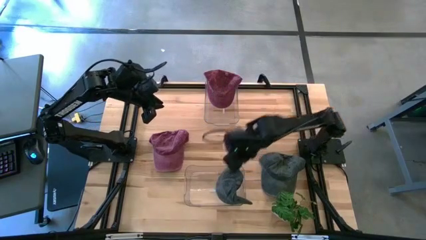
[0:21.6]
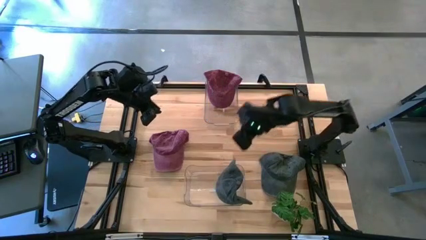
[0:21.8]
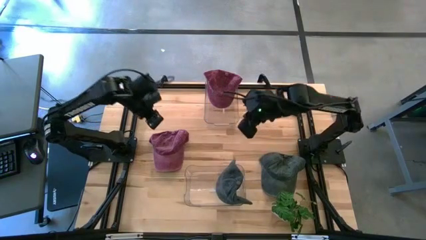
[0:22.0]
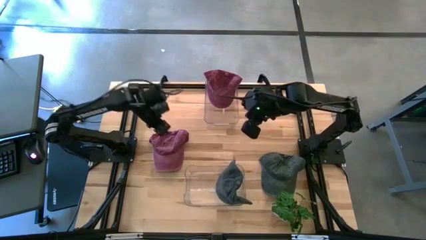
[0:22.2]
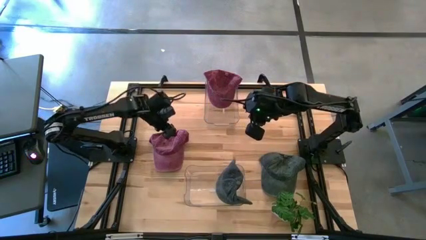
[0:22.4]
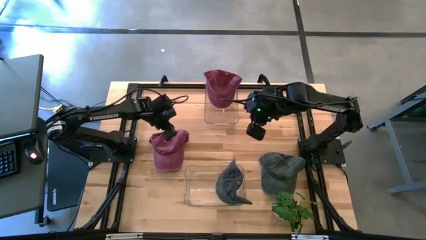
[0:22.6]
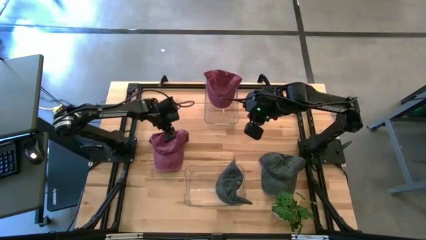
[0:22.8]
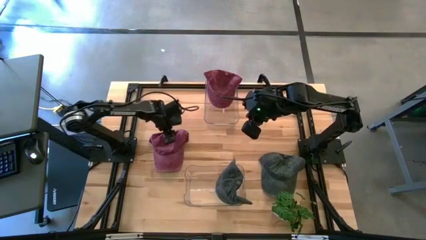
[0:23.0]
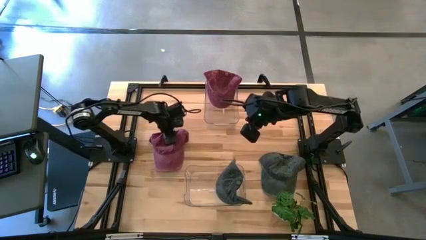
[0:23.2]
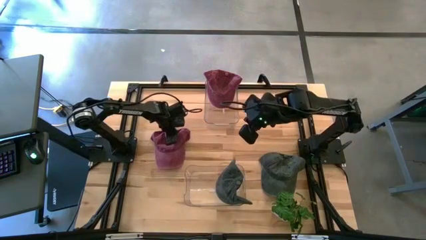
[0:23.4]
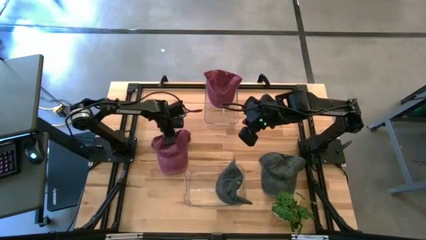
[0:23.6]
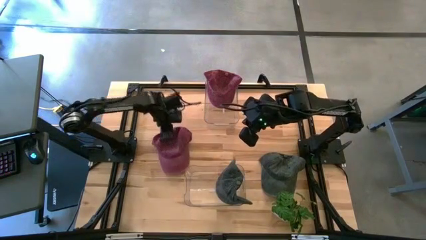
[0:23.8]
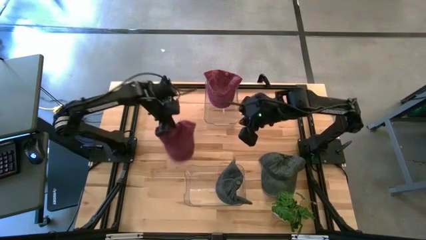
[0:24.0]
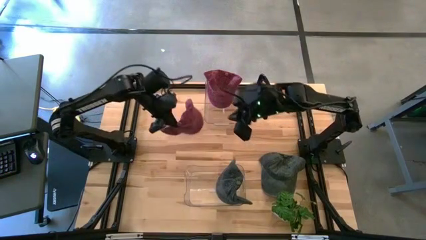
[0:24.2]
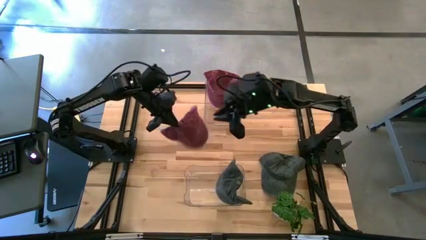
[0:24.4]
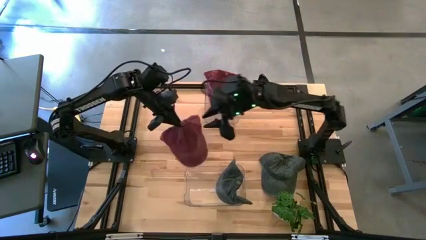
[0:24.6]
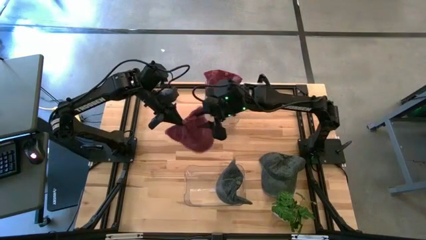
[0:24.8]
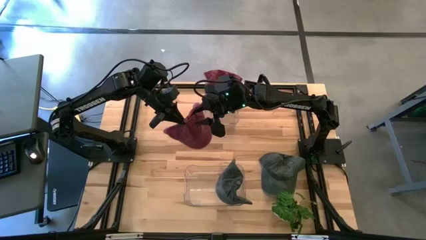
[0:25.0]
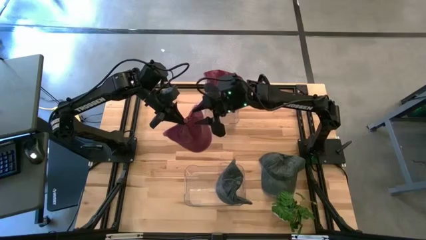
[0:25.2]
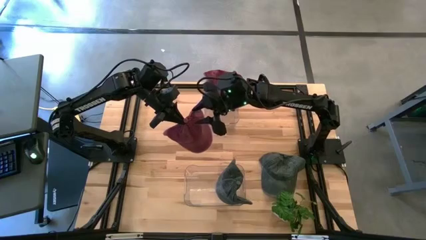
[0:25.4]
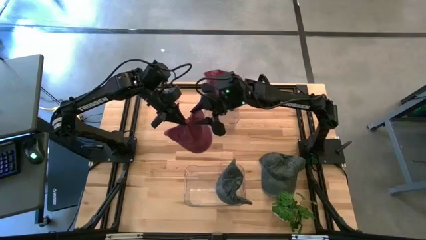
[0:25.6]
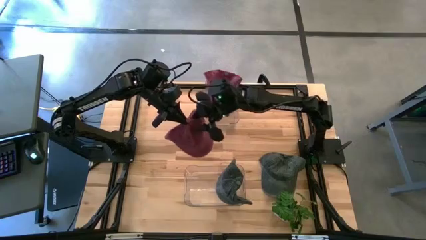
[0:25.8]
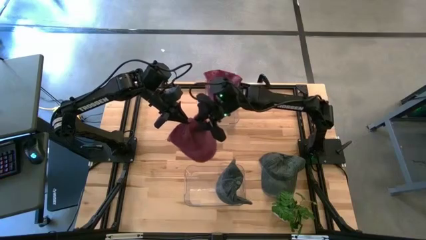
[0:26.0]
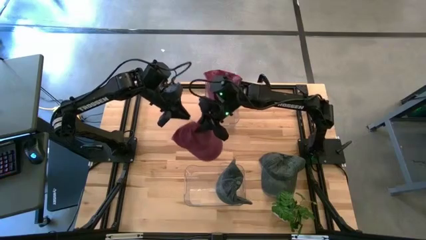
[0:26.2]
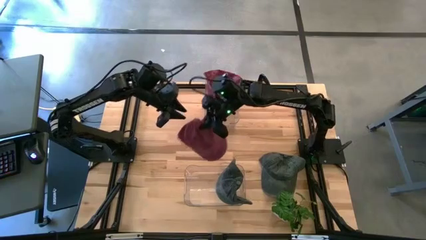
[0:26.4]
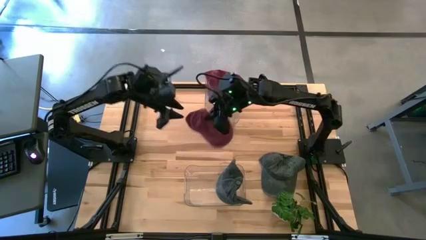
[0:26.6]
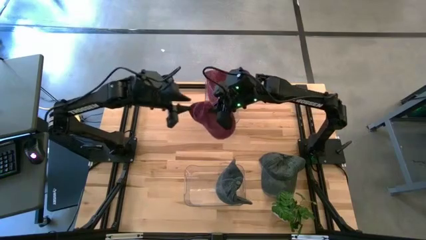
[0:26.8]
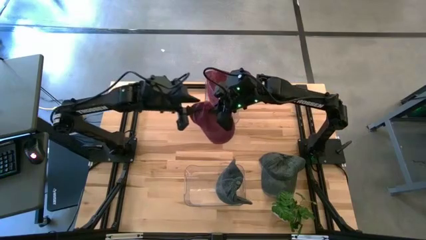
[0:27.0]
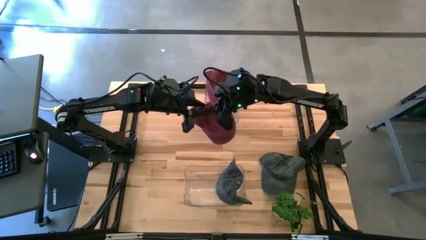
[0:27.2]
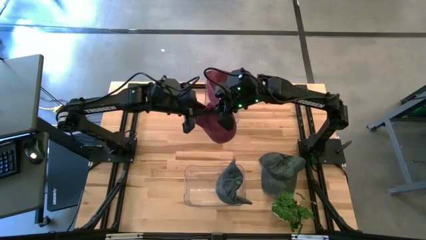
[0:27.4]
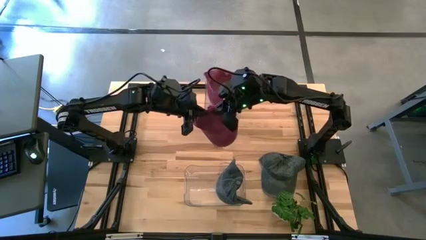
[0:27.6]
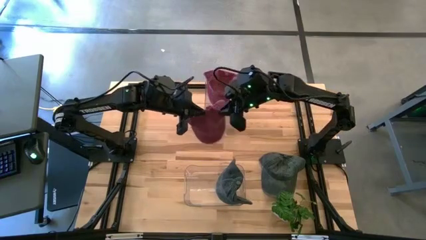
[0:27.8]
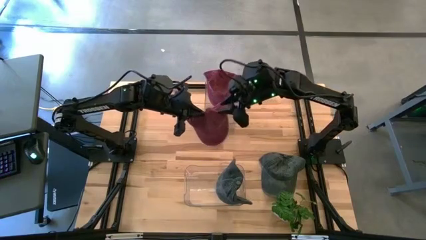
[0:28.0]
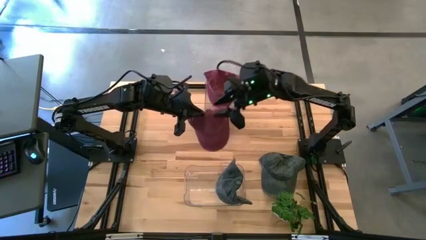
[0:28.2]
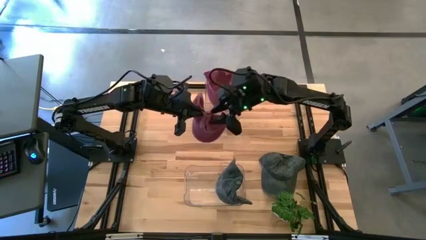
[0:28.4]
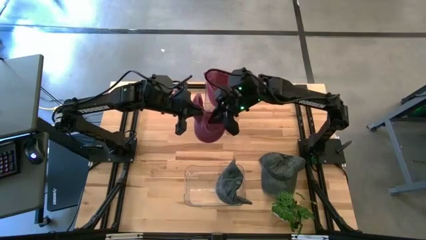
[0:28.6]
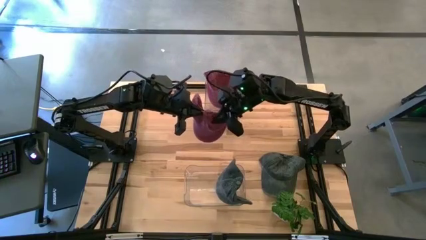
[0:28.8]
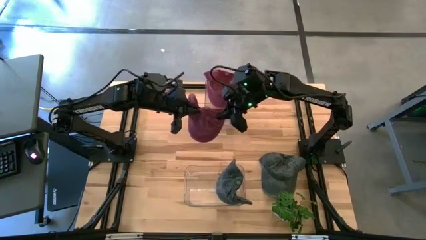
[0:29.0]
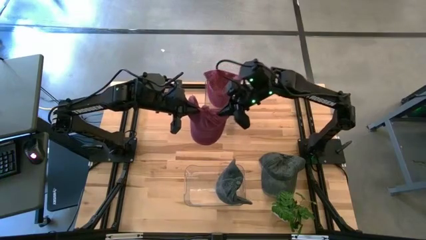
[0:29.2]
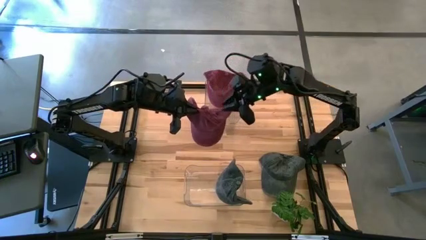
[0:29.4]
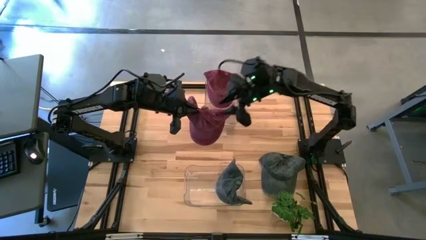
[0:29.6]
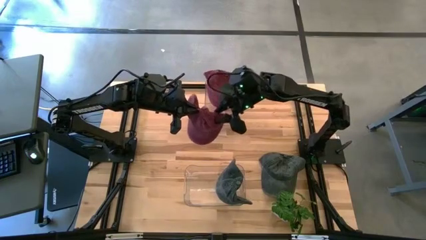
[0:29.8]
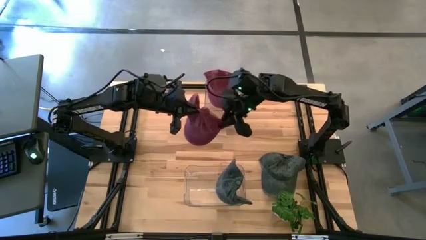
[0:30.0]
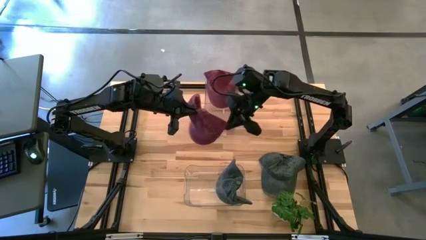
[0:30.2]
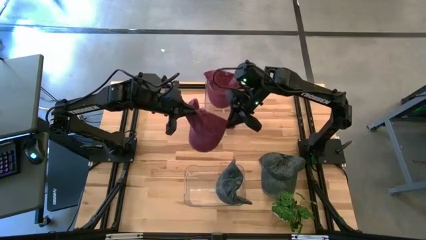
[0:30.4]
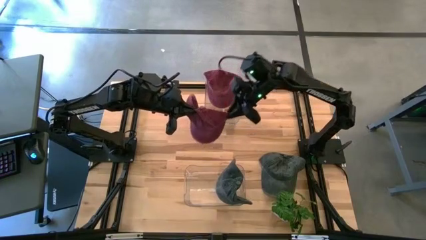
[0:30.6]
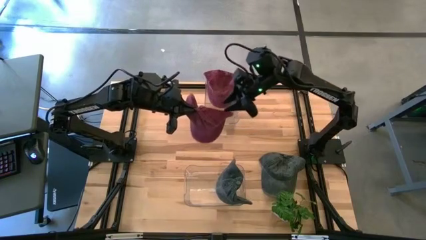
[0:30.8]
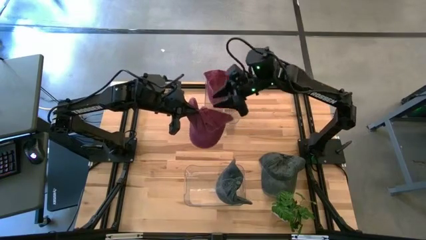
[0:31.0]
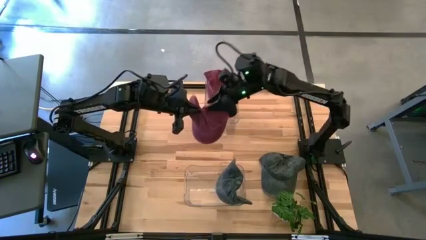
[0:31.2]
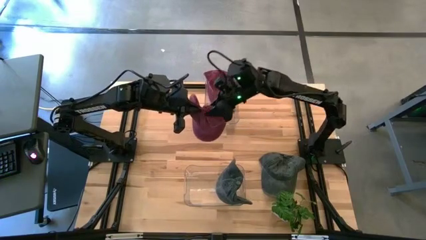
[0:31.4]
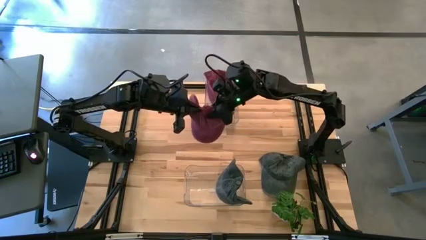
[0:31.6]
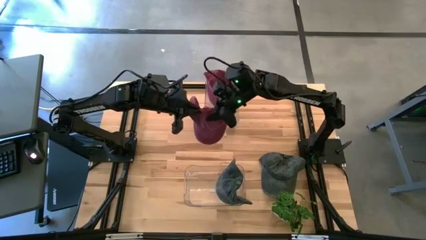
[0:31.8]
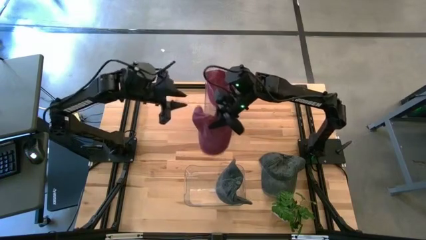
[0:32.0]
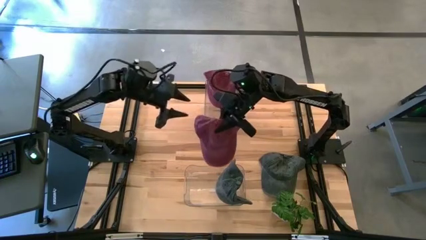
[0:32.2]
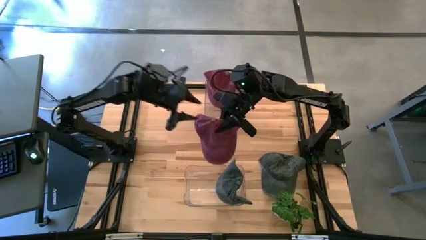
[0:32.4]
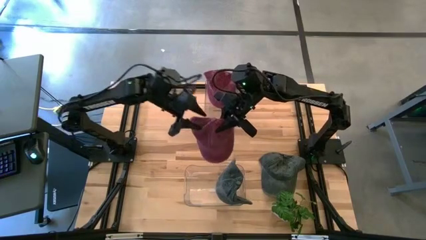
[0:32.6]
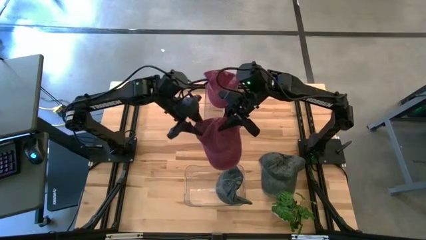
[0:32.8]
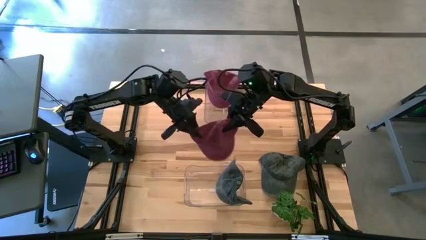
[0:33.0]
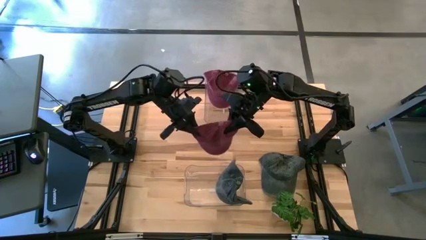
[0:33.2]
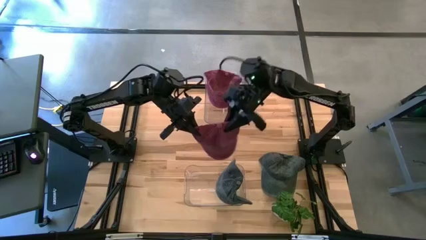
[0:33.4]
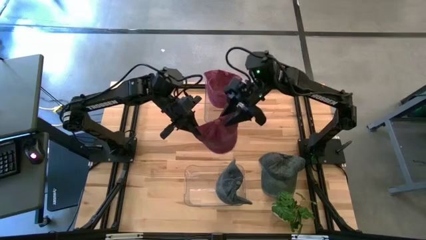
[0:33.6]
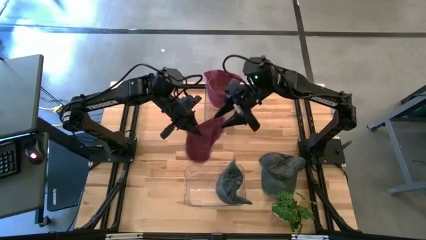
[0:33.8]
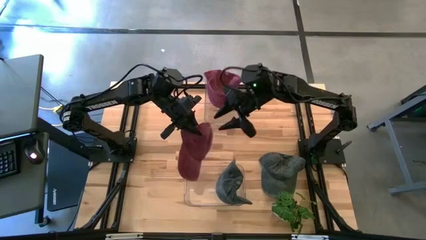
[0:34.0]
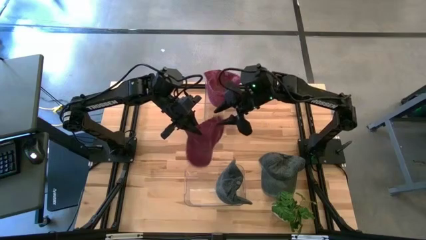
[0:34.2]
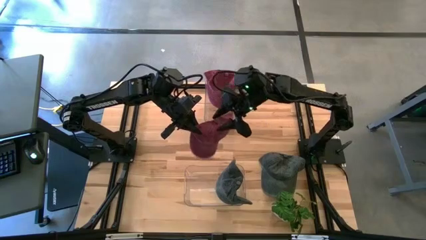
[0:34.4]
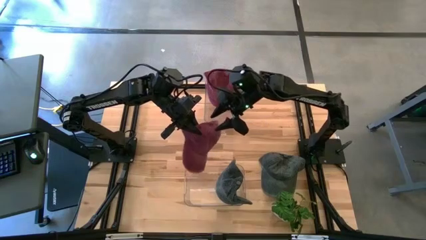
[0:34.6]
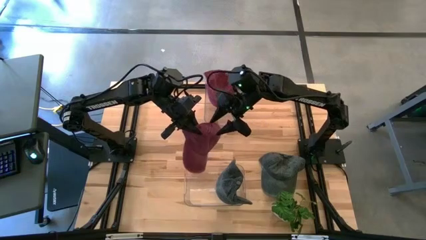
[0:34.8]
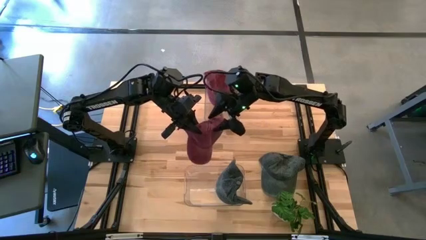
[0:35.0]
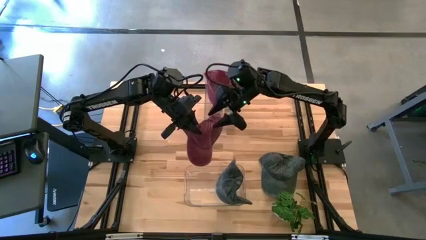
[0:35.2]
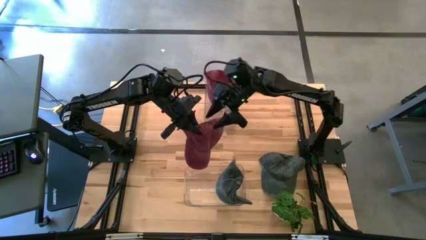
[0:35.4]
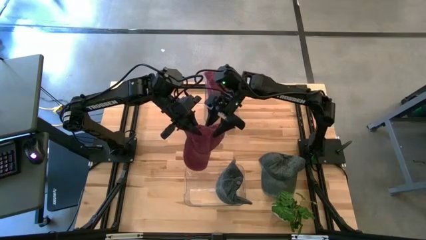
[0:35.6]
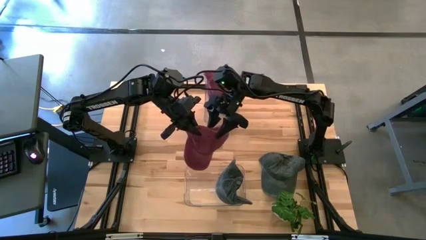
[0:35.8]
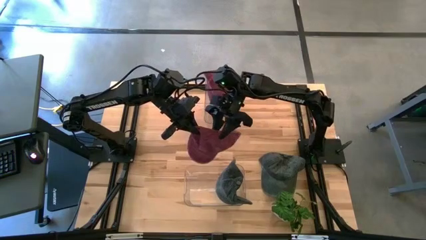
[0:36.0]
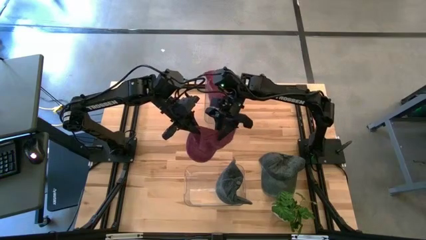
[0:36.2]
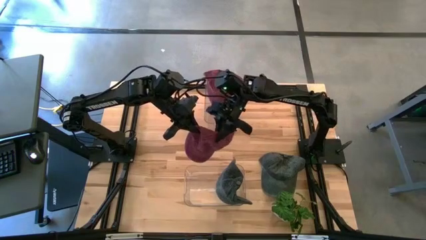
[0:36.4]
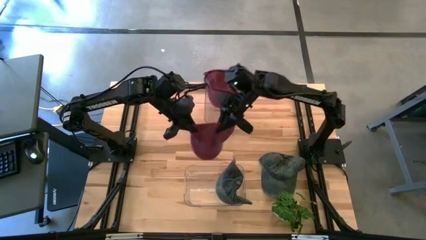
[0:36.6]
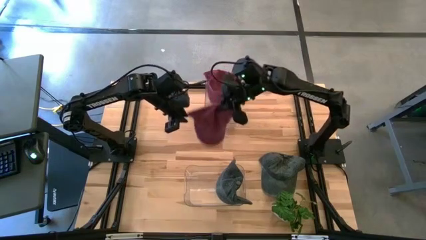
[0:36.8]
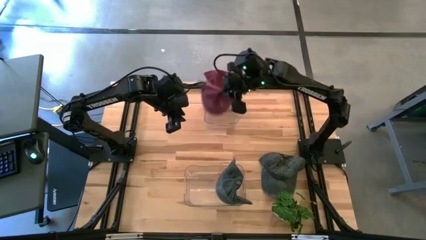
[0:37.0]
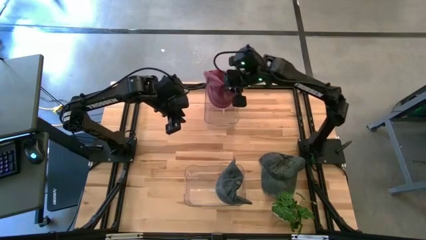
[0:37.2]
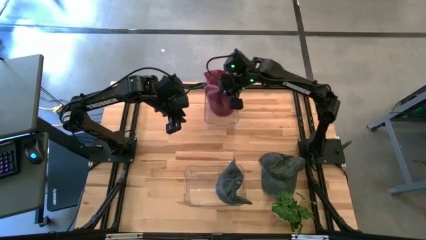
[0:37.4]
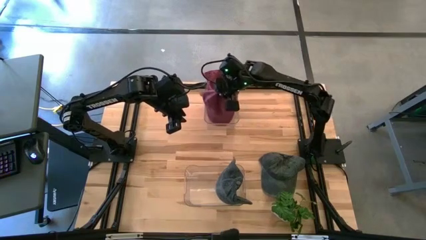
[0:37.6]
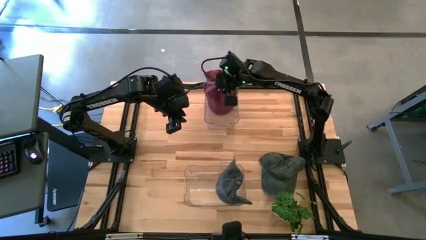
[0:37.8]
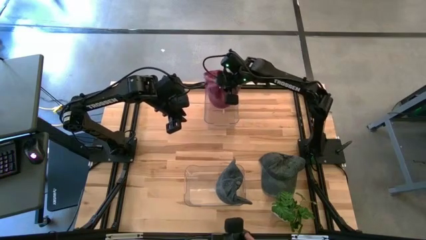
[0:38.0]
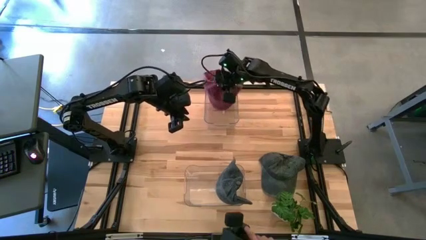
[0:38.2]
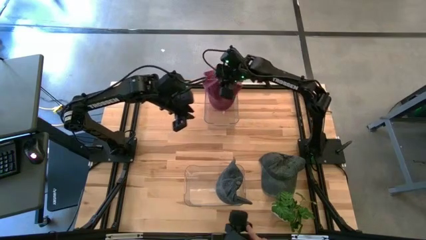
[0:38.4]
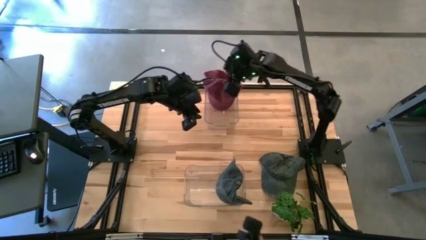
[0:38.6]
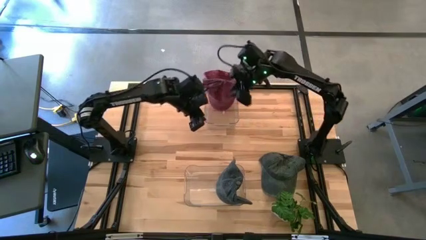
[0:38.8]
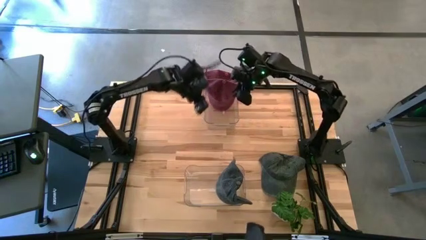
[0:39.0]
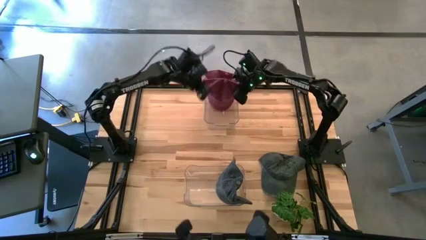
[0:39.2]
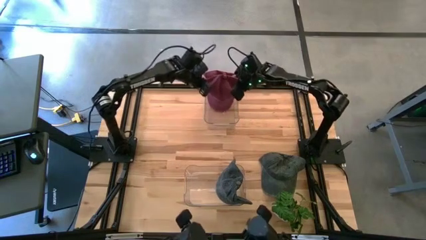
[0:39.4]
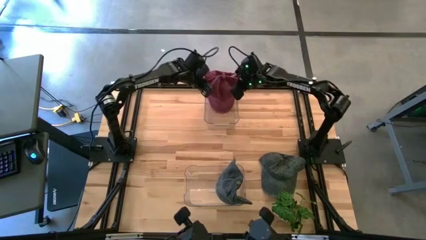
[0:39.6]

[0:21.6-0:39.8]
Task: Pick & Place hat
Put the red cap into the top transparent bin
